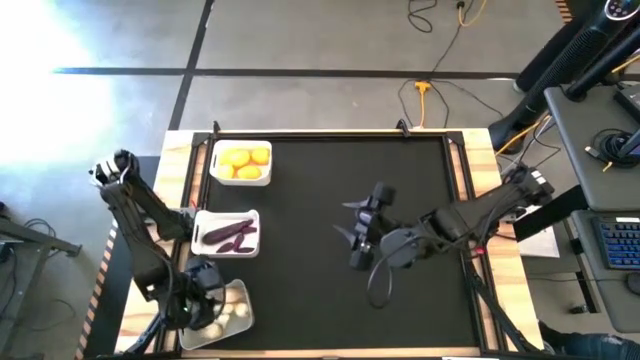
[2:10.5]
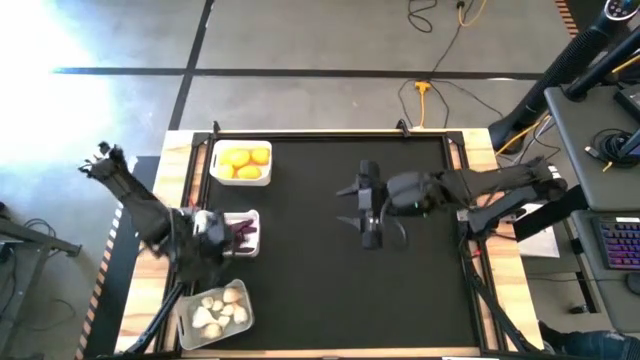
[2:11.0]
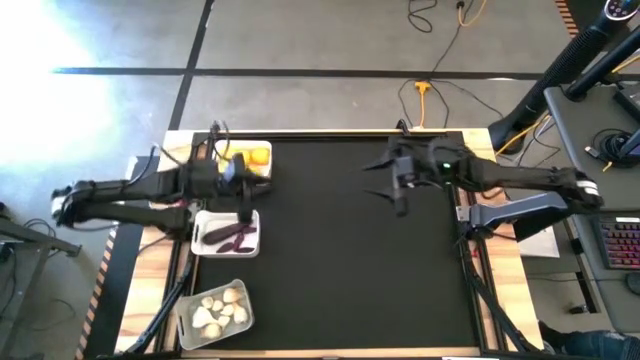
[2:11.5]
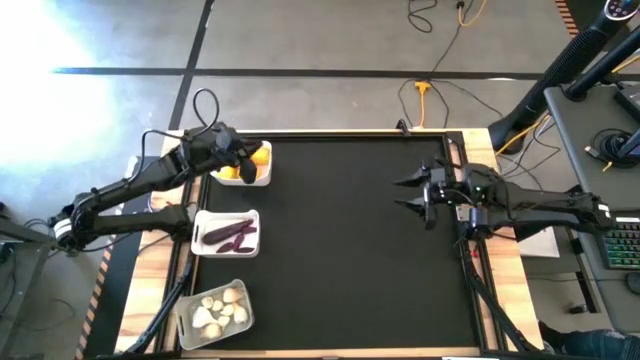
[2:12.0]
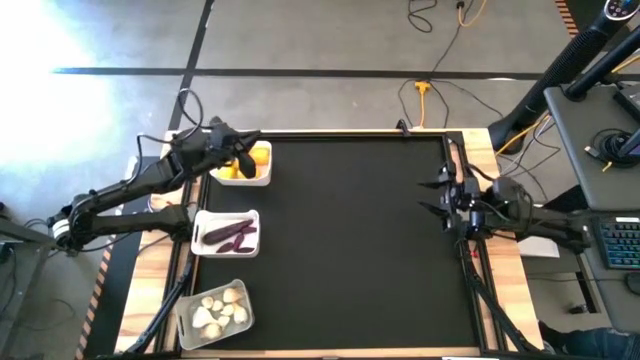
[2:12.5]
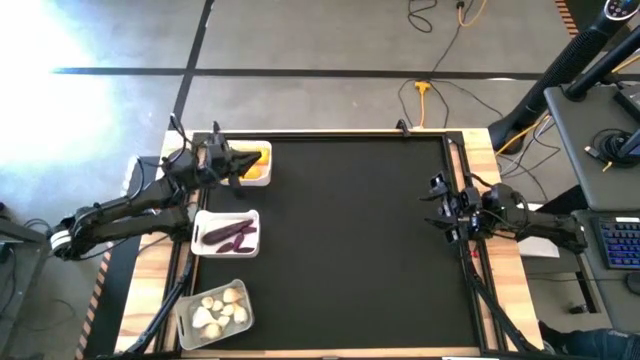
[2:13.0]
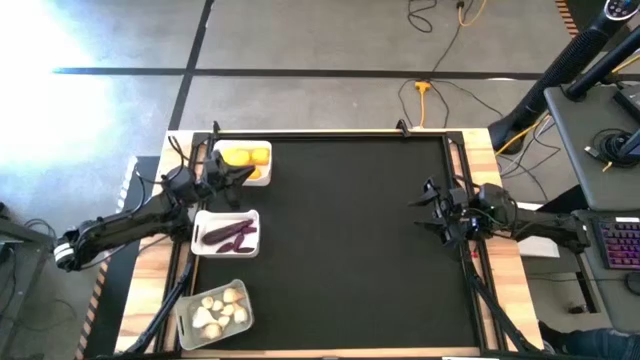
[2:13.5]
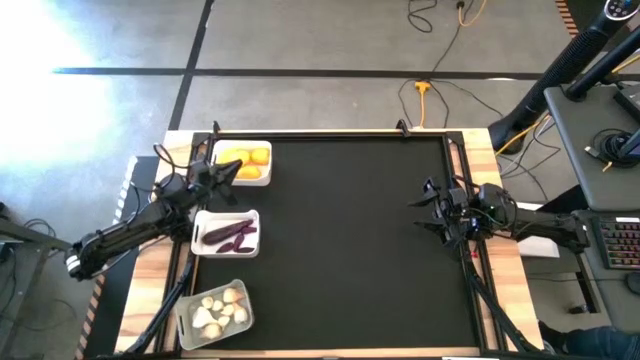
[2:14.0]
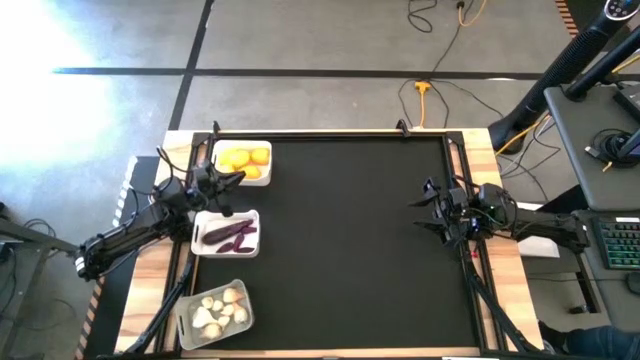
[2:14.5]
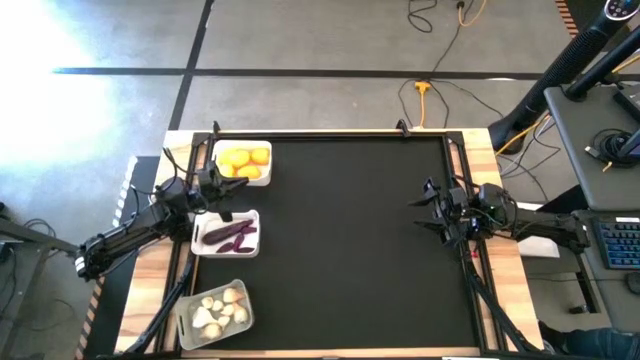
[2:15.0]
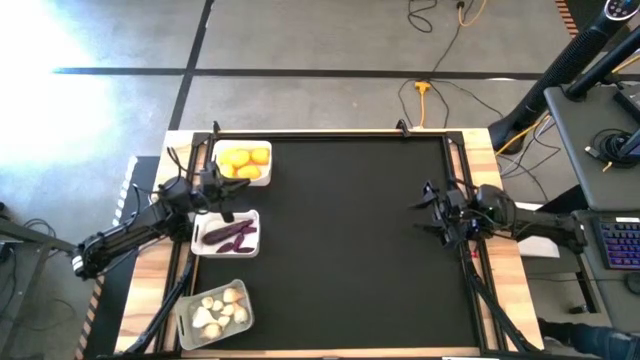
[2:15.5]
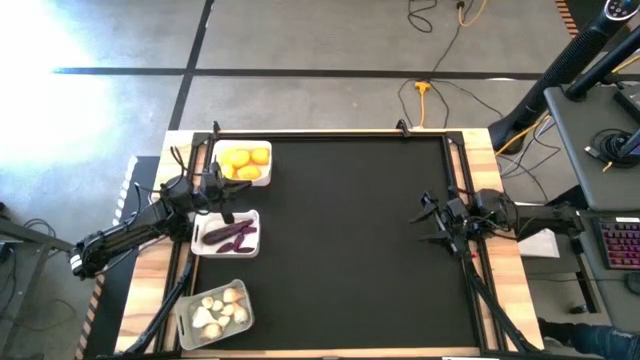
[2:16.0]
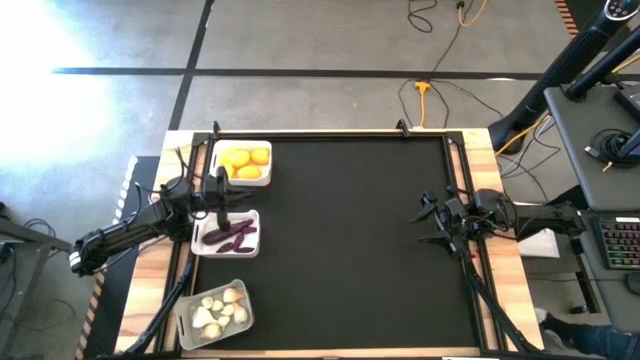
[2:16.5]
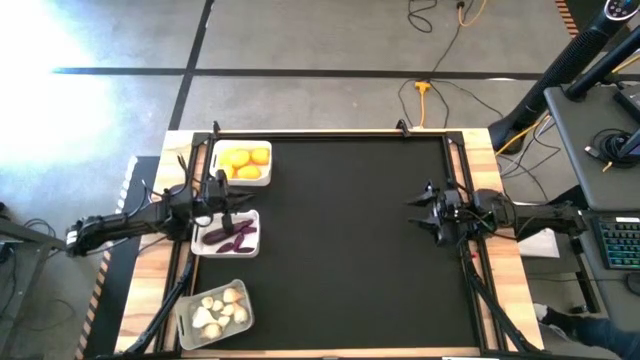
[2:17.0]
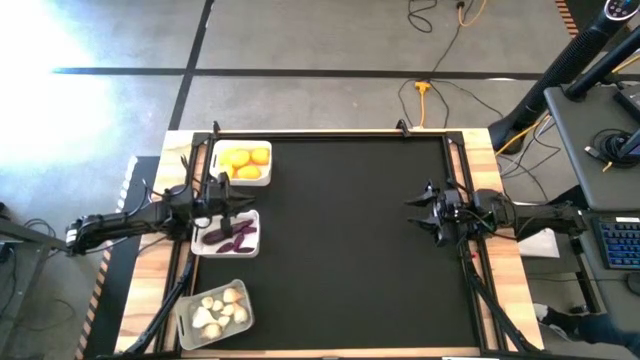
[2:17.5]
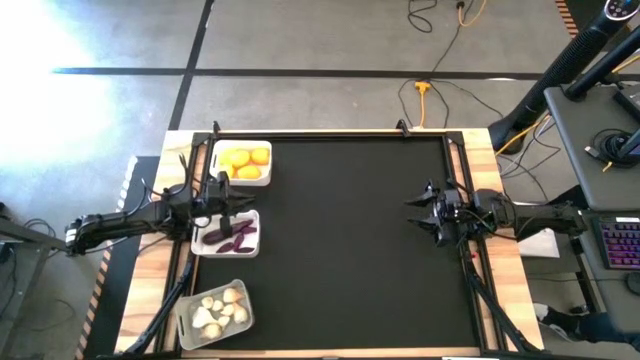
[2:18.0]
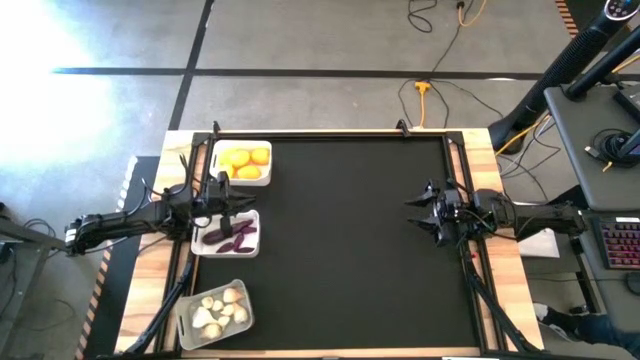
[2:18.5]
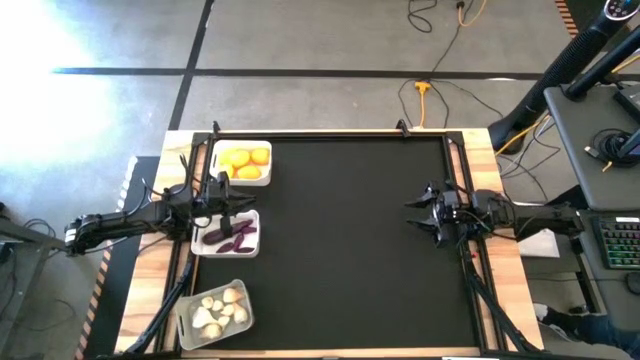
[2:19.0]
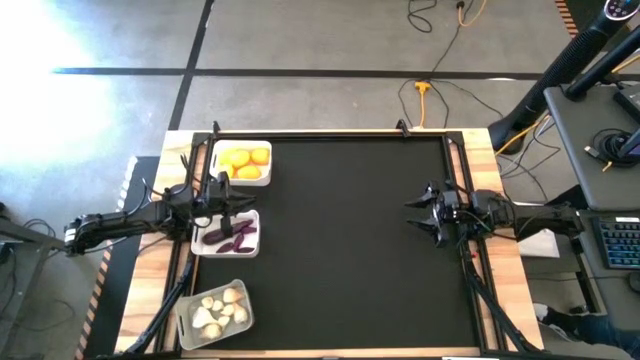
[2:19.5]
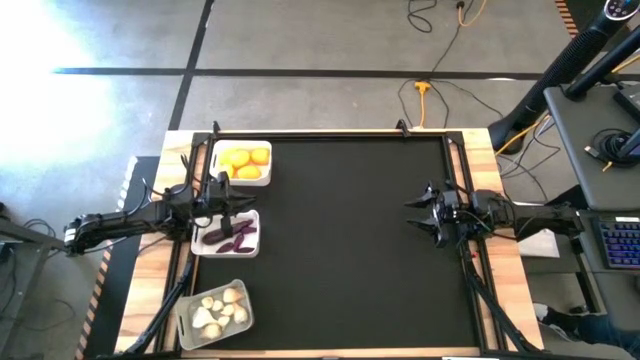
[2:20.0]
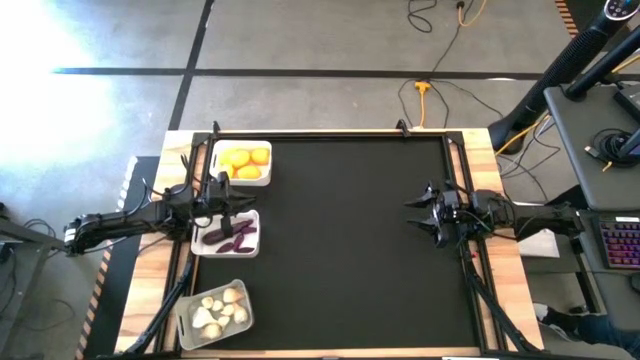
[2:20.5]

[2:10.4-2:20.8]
Task: Sort produce into baskets
Return to Home Position

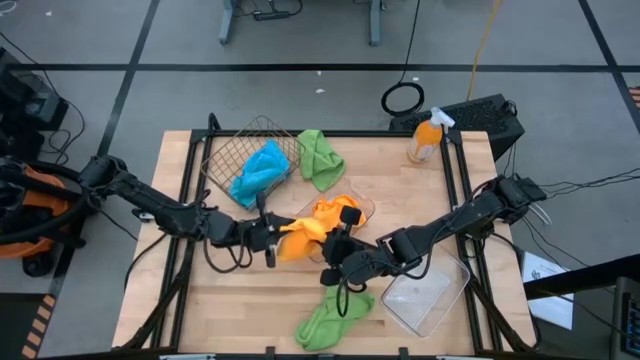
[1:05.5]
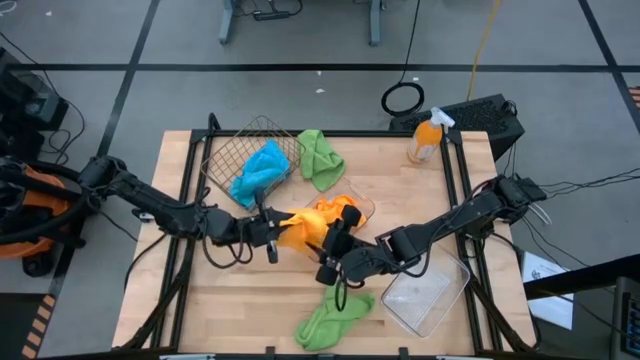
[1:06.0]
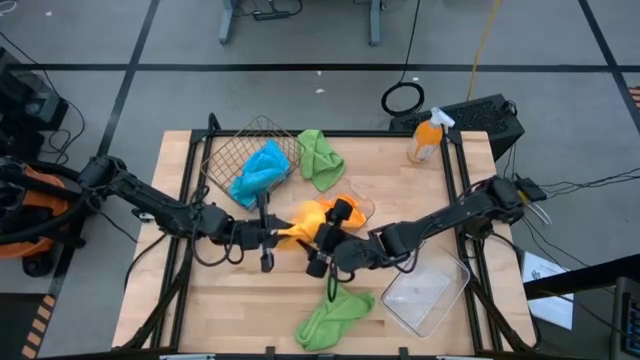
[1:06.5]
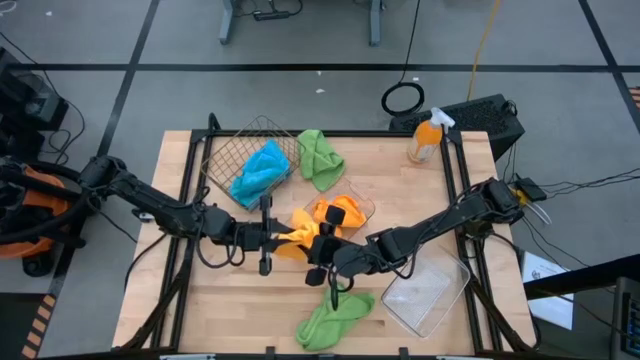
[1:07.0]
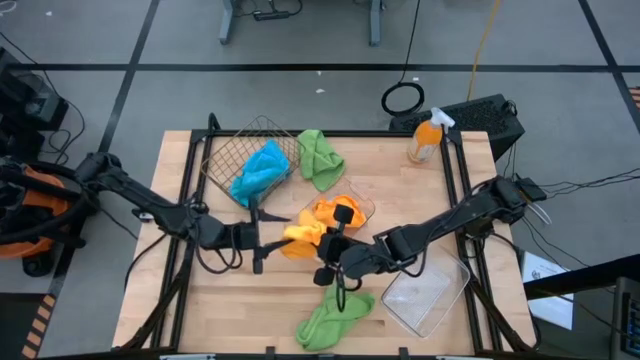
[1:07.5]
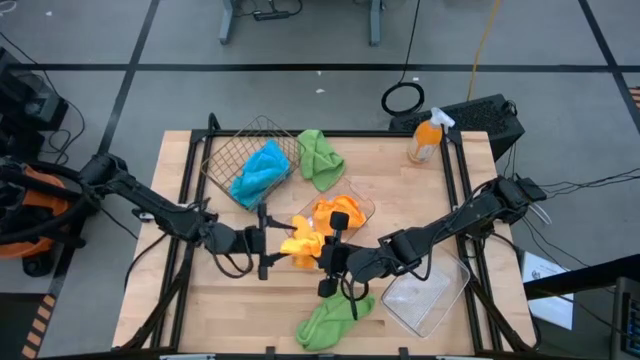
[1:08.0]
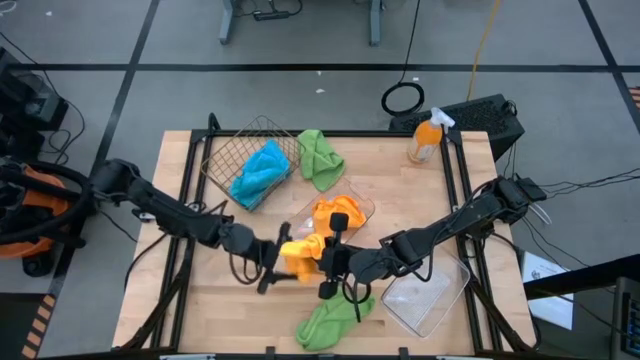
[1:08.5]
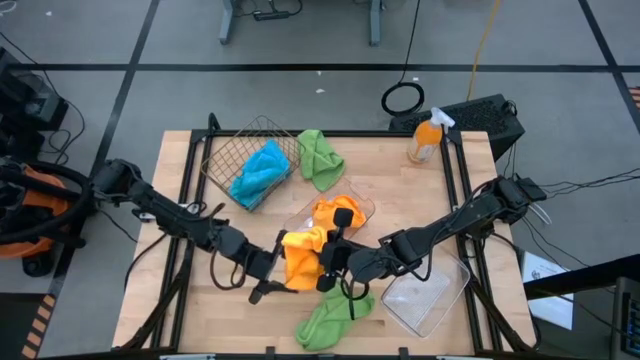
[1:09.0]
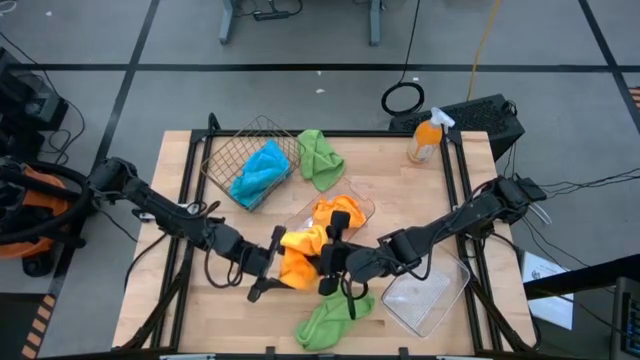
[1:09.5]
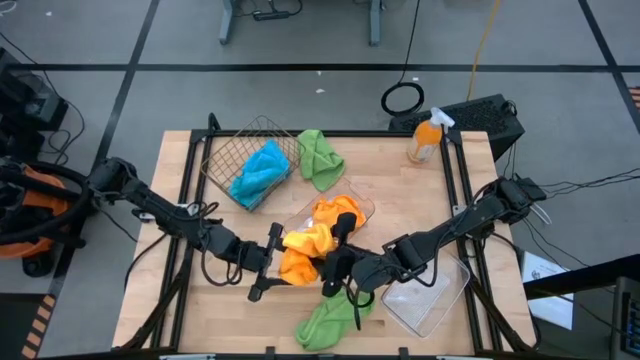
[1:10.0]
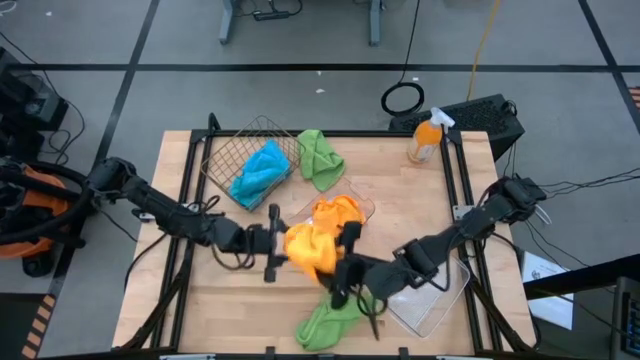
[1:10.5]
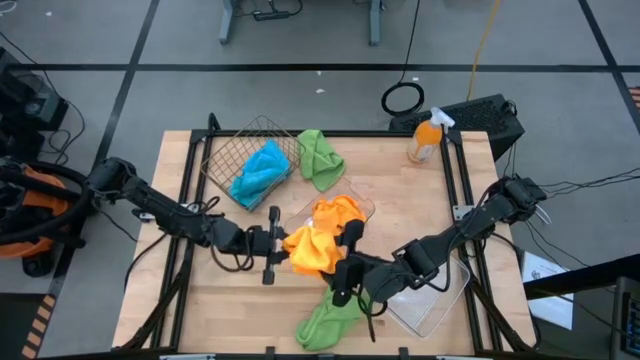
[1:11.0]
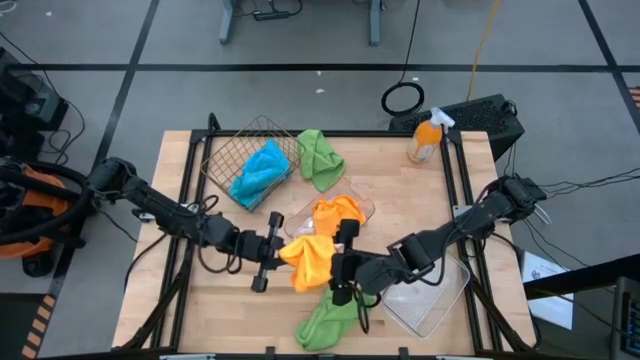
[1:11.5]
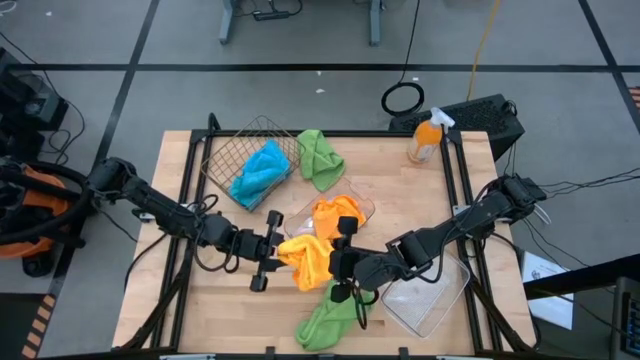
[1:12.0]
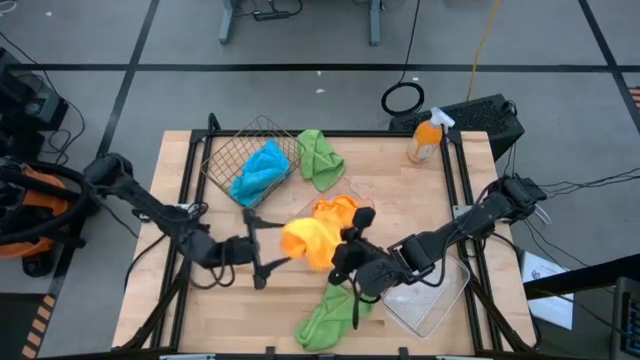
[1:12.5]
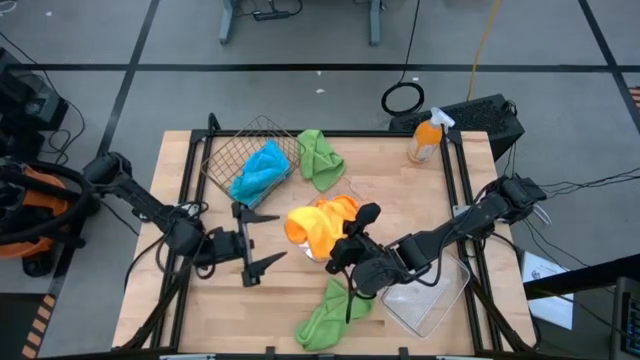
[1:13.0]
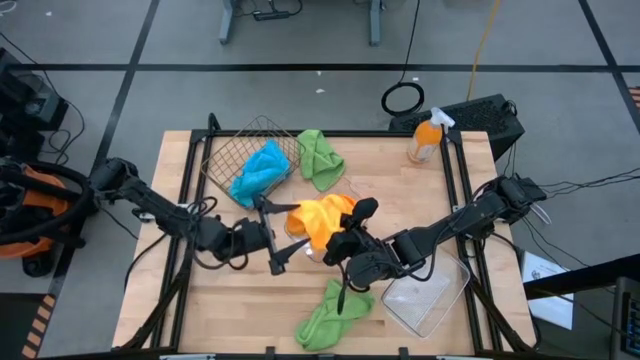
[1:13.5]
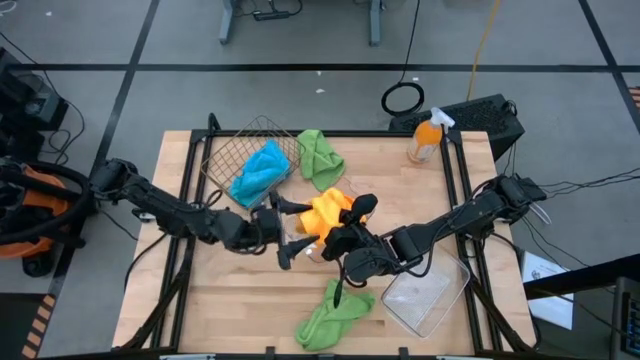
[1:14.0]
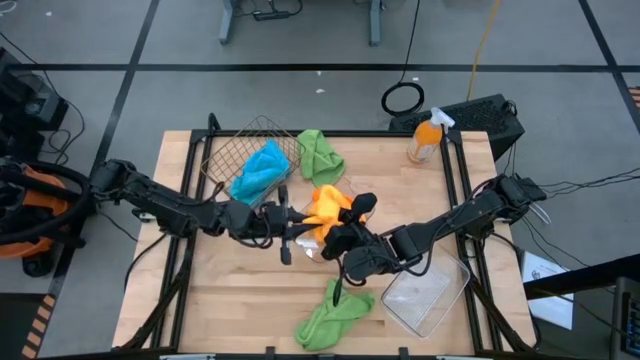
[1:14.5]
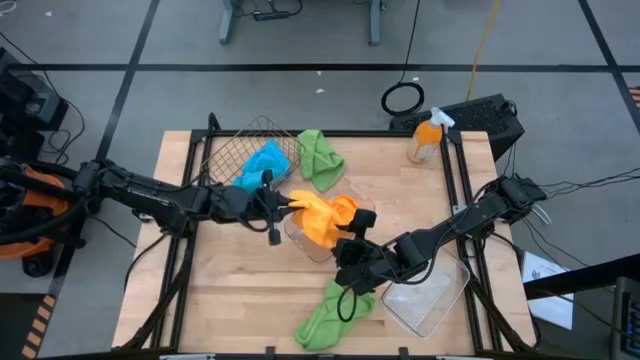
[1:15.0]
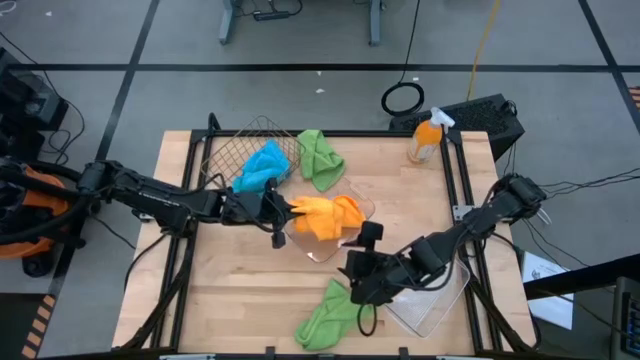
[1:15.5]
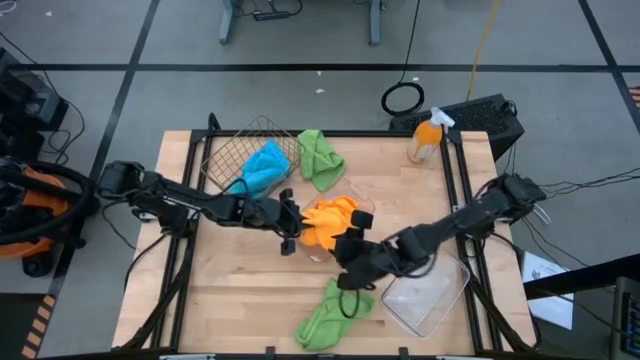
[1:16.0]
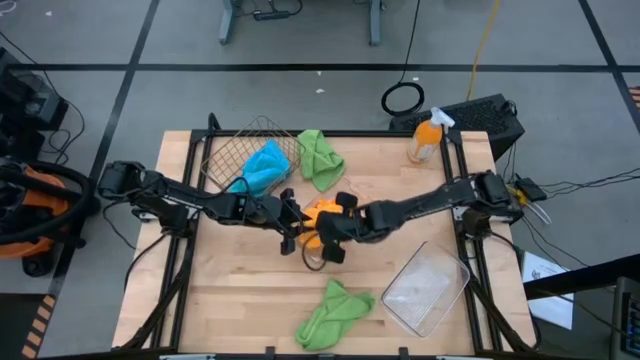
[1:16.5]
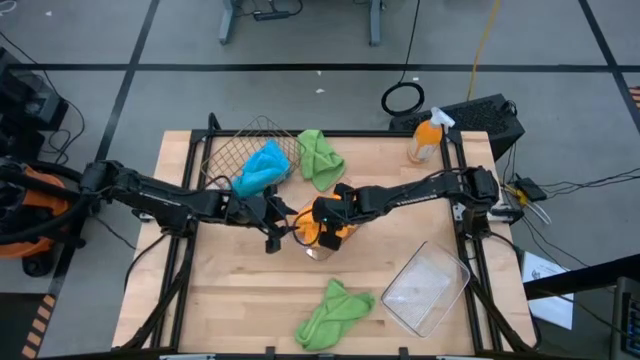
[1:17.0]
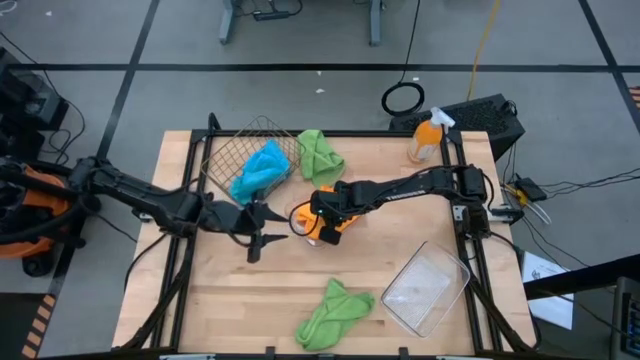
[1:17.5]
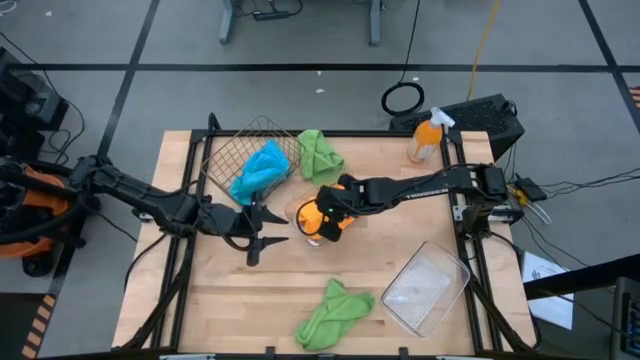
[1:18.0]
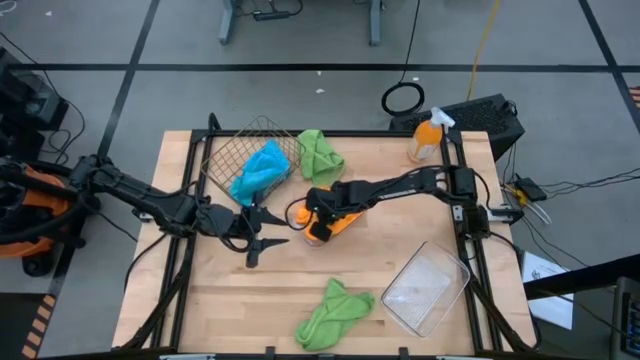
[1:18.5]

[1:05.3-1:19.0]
Task: Sort microfiber towel by color & place in baskets
Put the yellow towel into the top transparent bin
